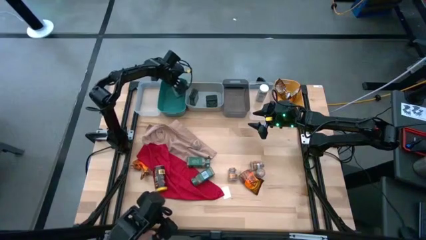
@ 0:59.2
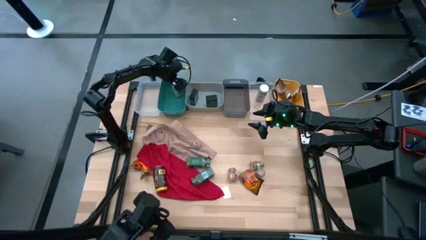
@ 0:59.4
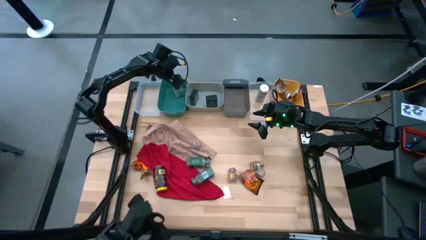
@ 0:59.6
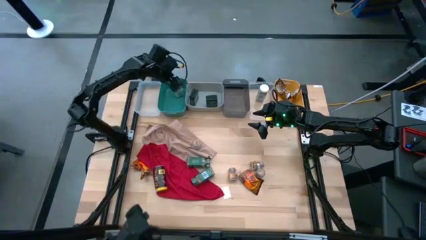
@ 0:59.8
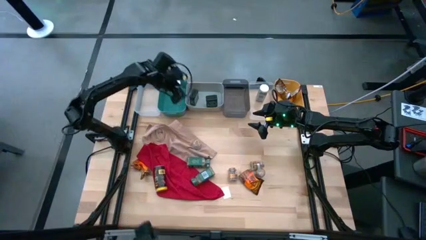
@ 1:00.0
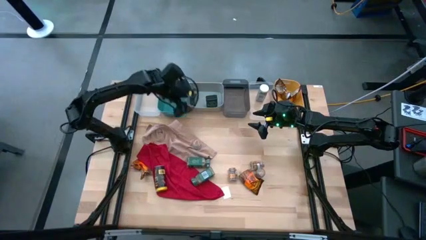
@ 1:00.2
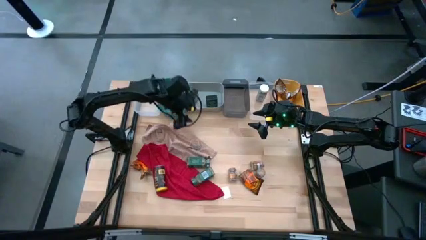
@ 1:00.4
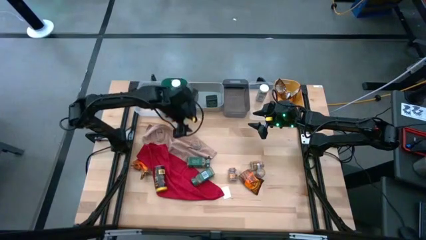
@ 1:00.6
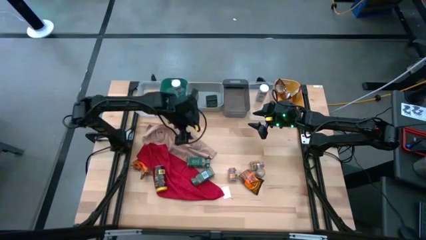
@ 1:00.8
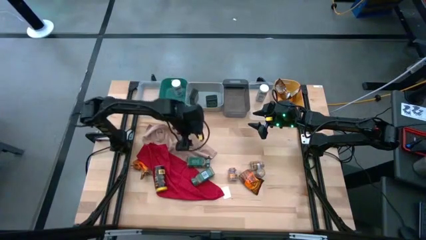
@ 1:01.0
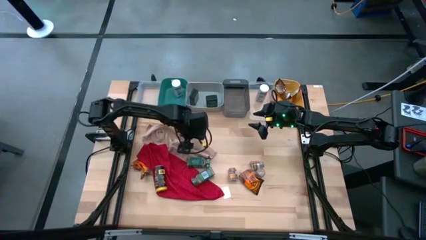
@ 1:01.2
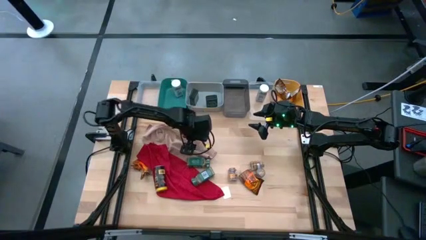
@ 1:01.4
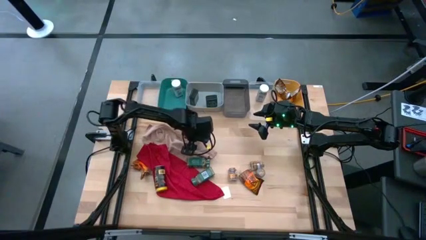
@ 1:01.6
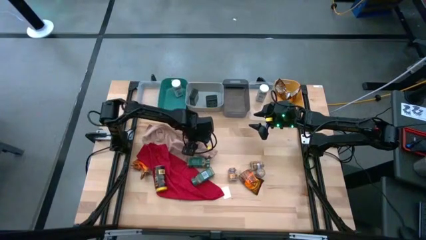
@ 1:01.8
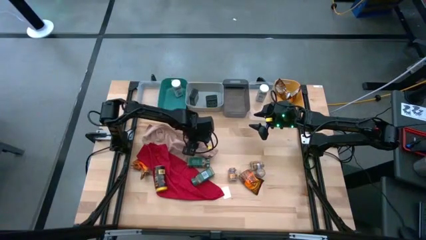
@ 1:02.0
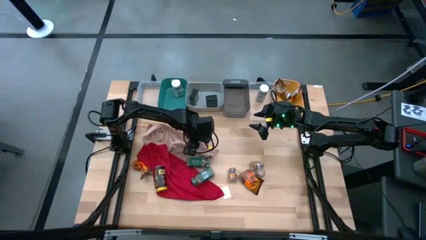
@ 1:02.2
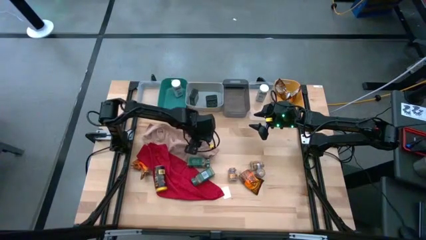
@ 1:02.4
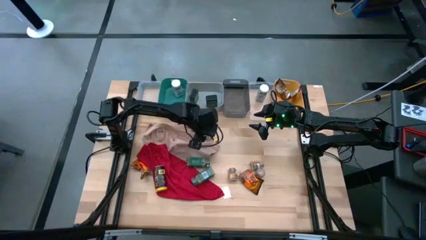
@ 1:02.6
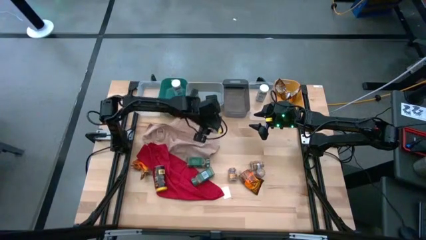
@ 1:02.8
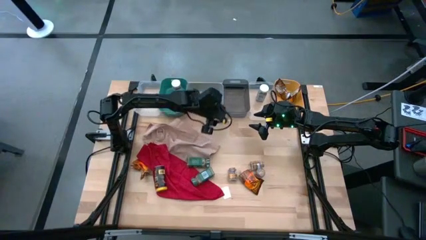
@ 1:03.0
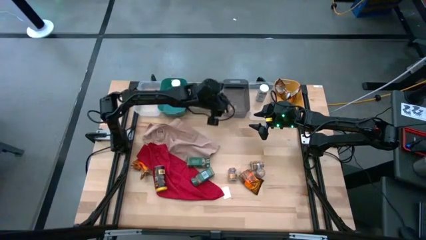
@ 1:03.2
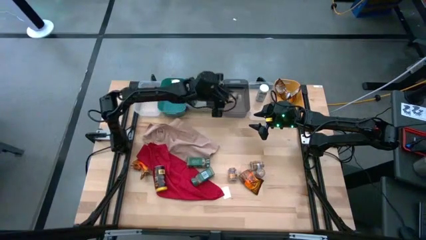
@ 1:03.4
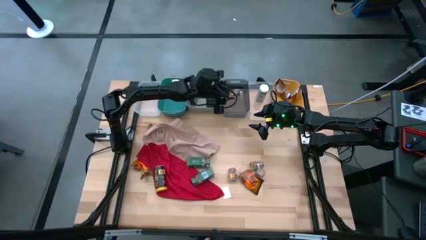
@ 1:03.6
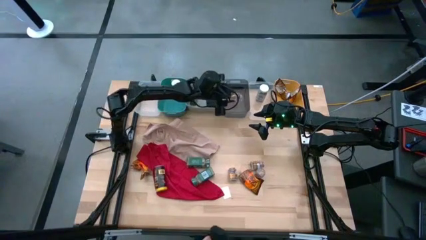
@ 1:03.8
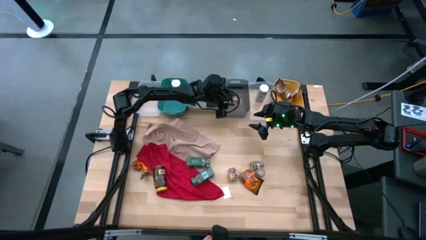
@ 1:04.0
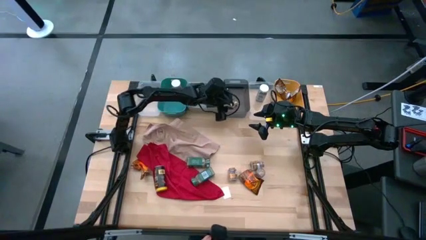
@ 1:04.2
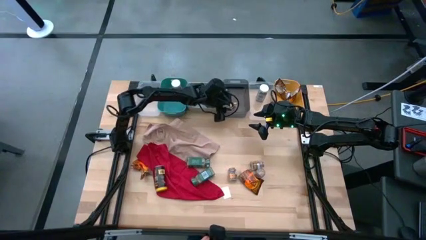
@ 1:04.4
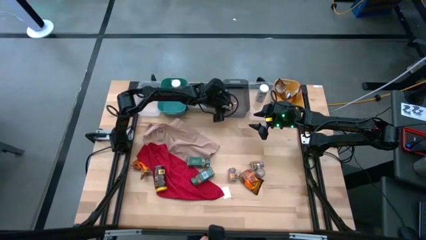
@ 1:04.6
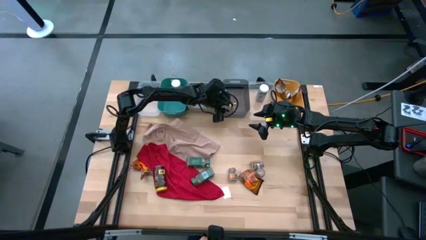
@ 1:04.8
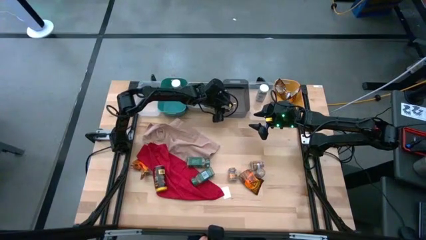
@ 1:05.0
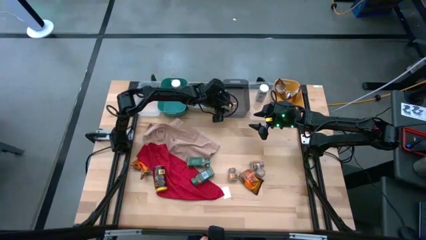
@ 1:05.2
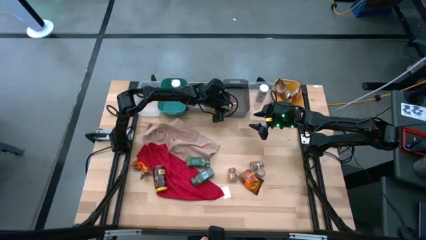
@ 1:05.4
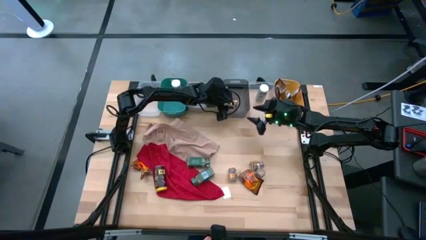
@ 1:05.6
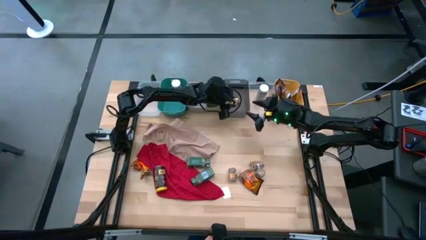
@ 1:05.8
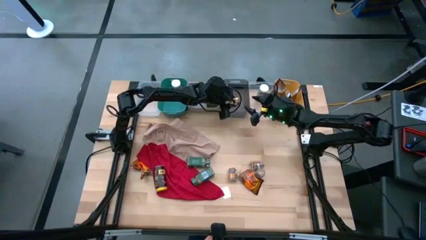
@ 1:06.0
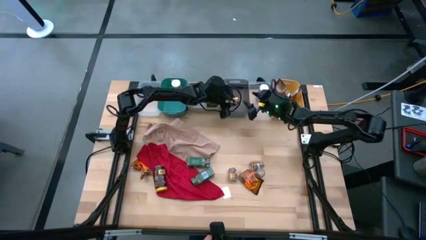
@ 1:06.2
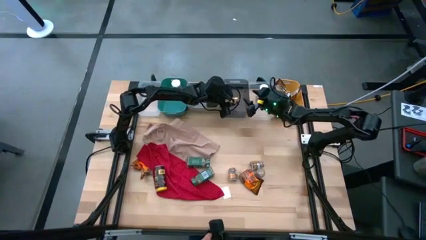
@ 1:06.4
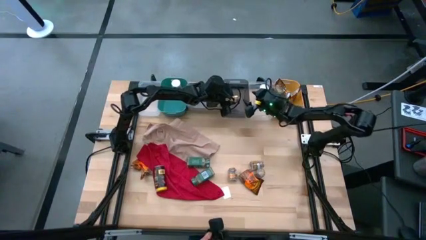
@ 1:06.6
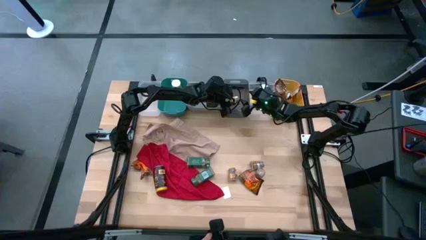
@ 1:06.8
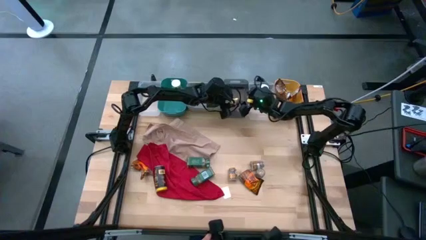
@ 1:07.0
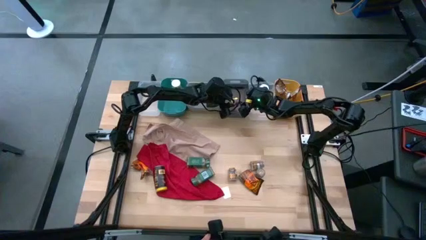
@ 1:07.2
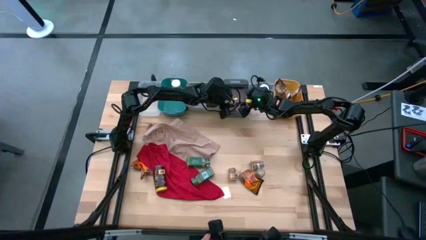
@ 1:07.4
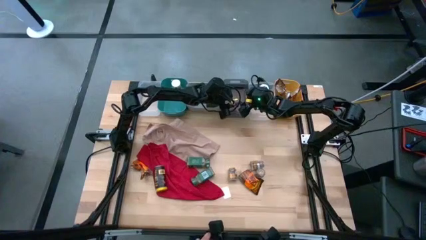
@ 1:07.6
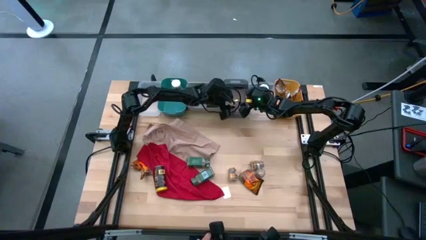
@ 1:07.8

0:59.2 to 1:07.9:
Task: Sort spices by type
Put the brown seasoning bottle into the black bin

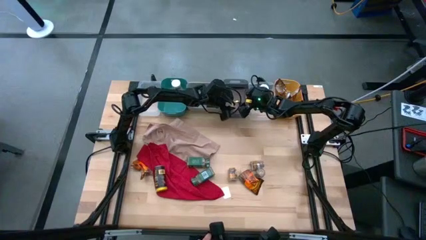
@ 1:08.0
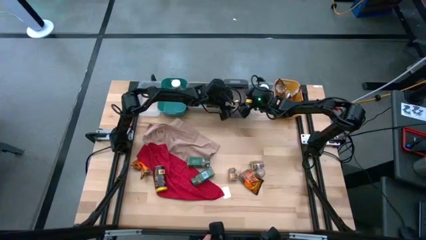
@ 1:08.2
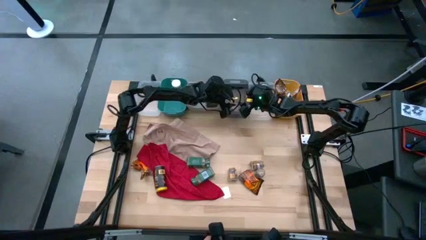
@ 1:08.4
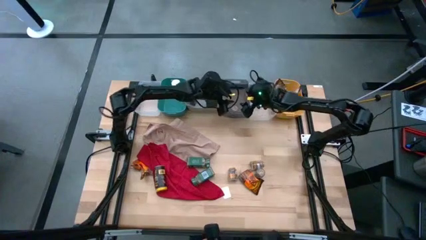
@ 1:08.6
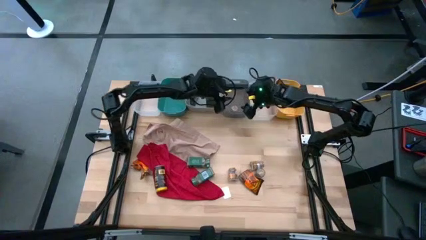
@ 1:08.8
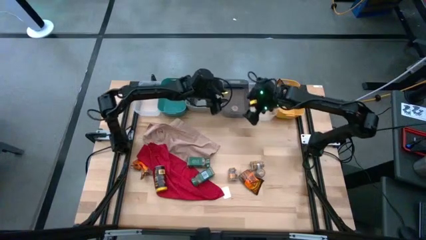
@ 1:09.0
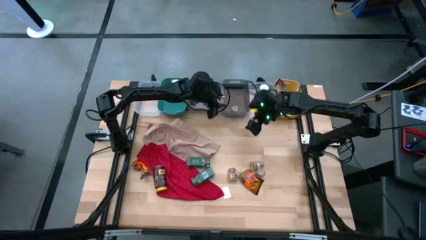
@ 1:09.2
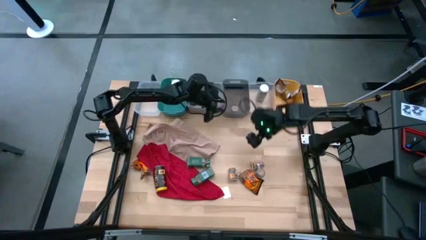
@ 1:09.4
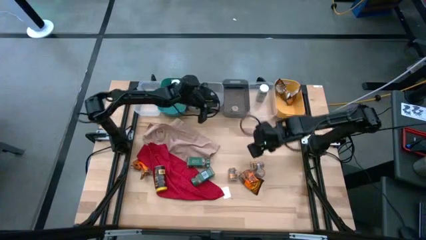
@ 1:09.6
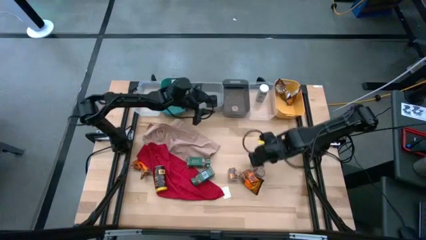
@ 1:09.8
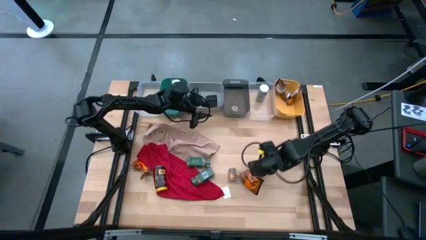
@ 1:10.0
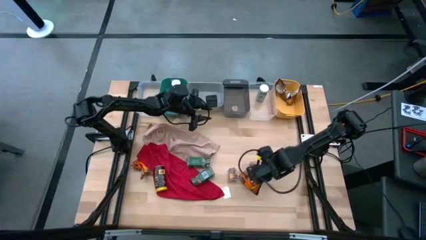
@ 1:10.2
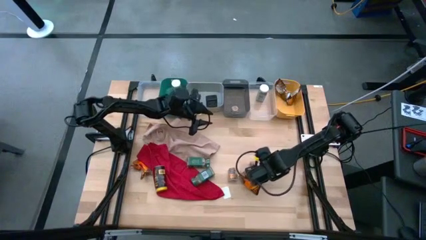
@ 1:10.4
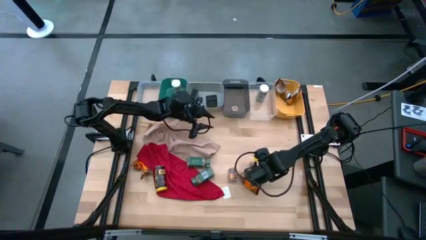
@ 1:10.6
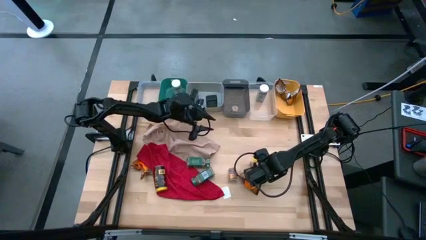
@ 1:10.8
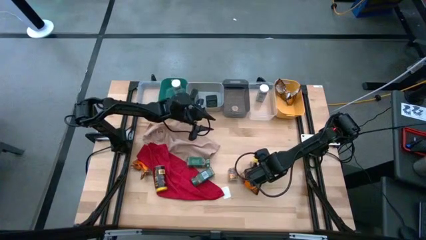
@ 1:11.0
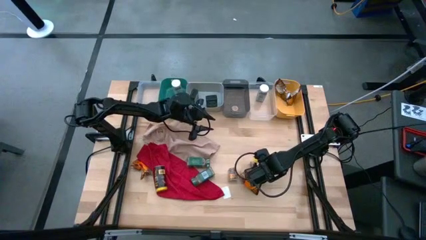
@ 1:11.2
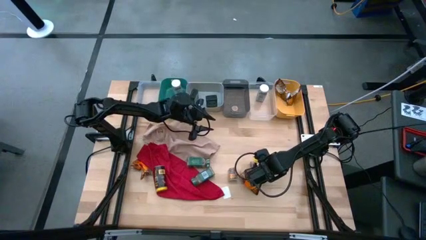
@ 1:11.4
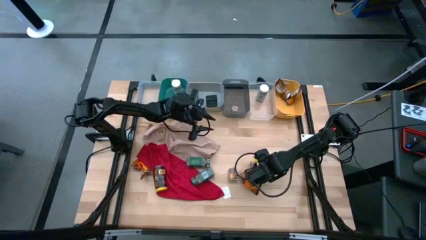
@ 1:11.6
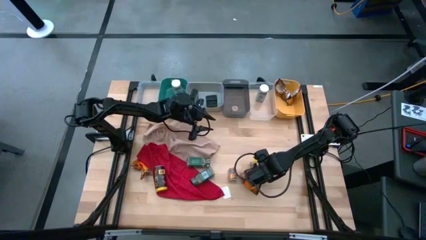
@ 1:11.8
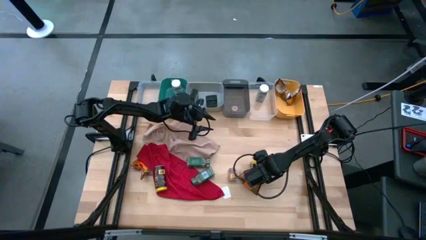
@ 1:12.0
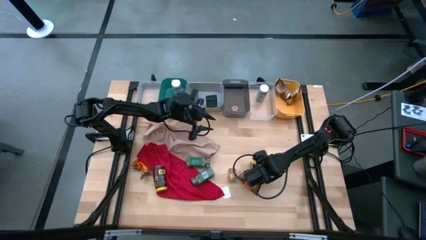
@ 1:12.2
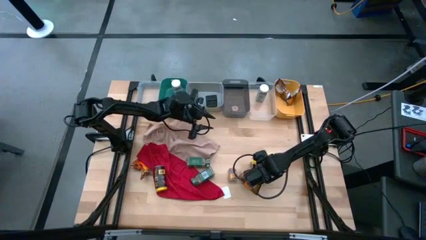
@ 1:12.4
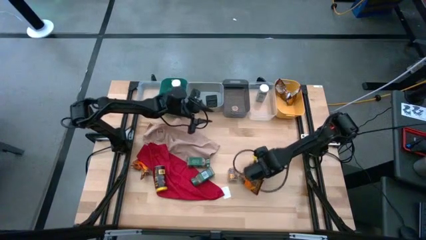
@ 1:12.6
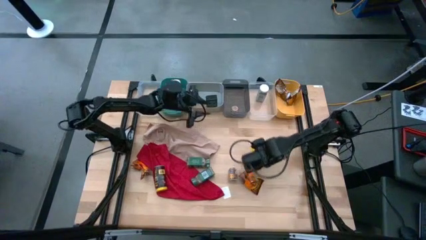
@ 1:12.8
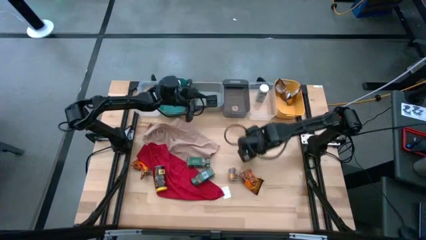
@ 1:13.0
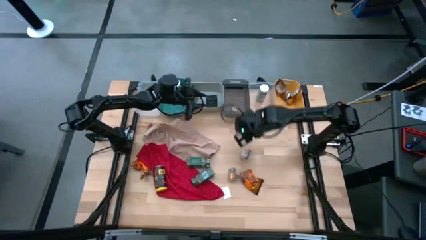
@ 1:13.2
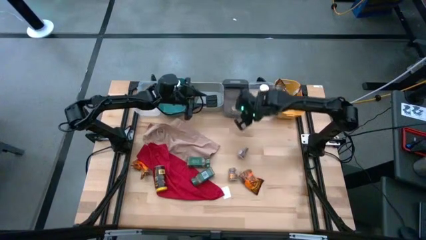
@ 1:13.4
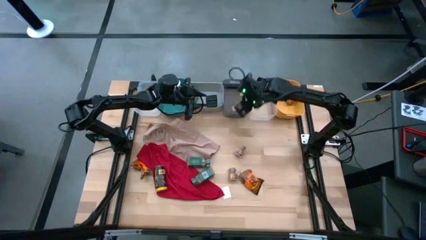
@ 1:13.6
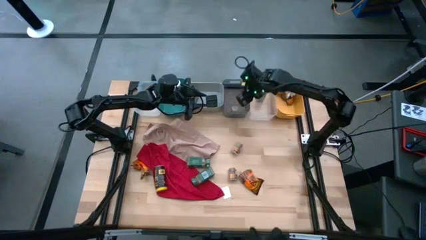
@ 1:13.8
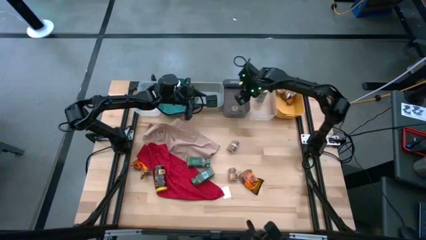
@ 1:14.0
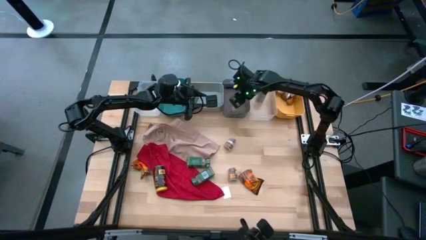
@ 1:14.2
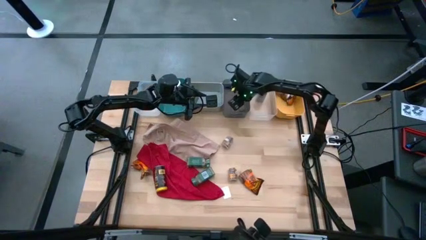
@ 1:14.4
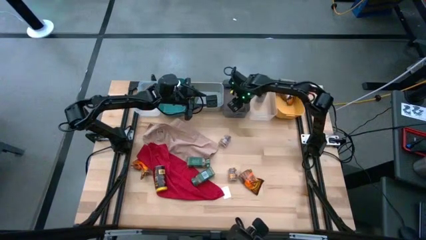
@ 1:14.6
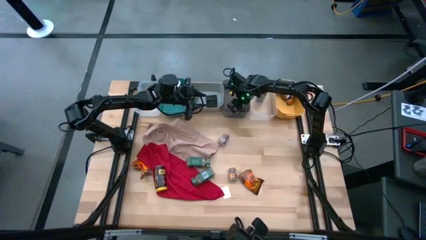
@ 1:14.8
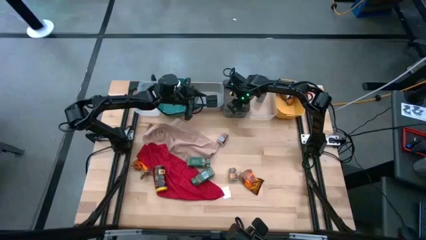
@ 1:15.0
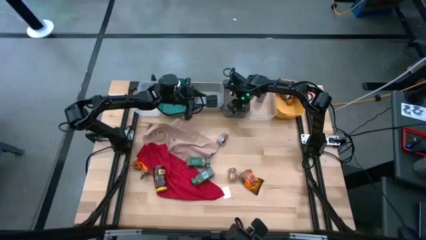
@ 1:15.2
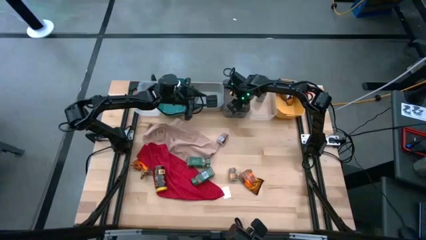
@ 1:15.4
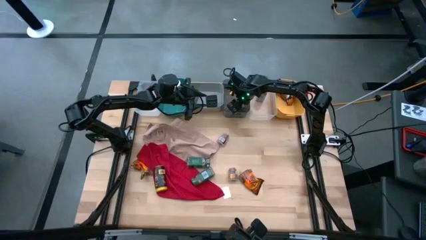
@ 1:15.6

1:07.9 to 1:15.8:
Put the brown seasoning bottle into the black bin
